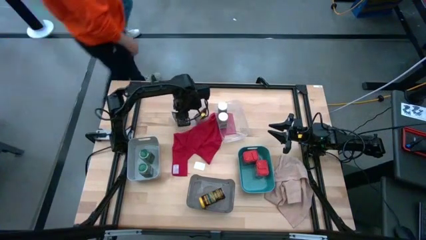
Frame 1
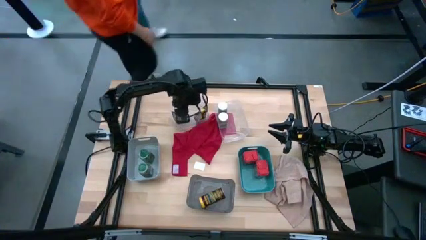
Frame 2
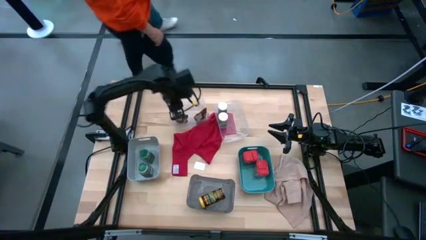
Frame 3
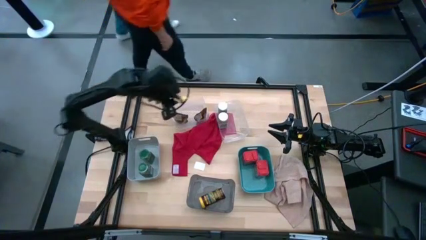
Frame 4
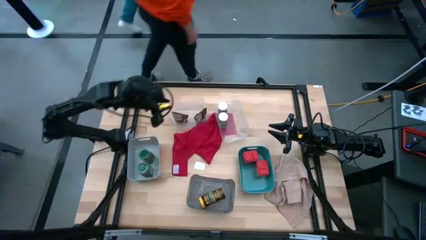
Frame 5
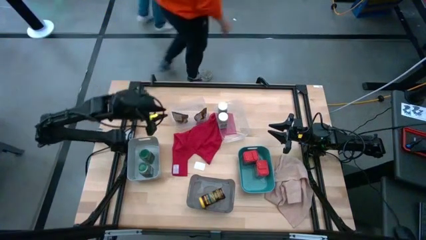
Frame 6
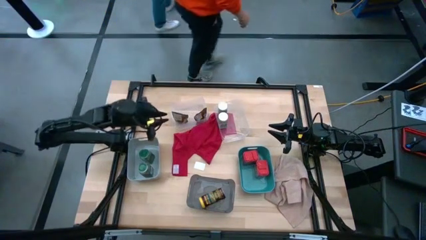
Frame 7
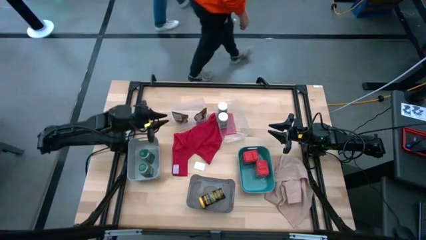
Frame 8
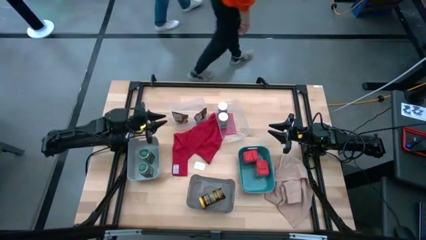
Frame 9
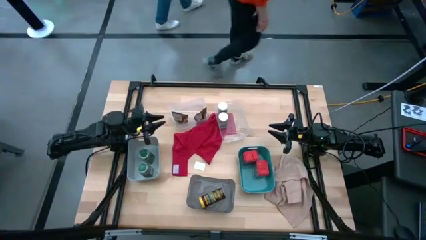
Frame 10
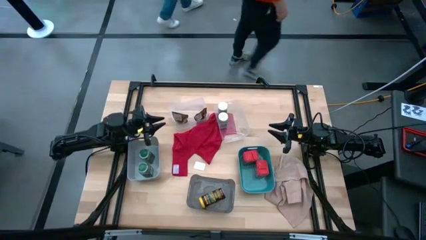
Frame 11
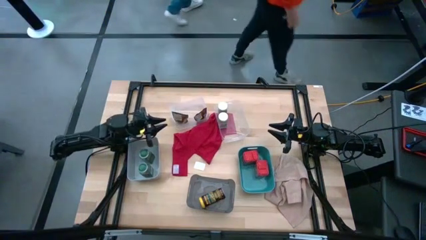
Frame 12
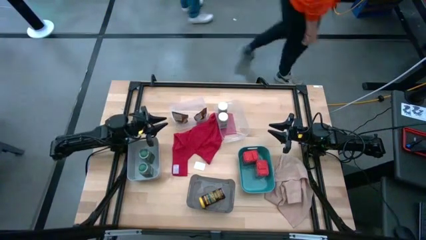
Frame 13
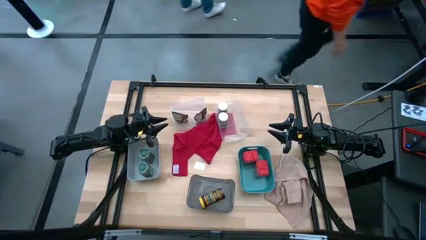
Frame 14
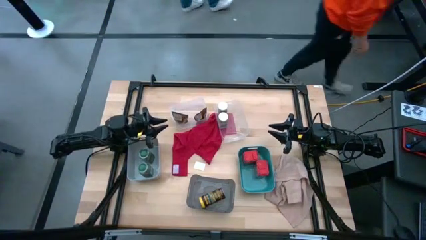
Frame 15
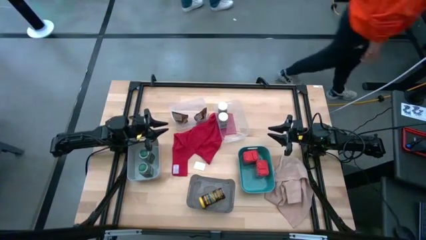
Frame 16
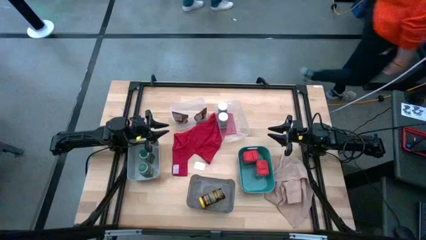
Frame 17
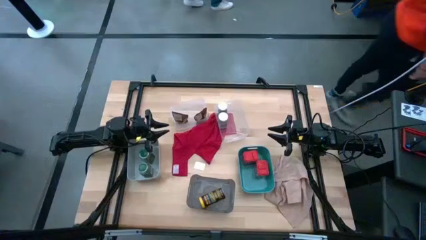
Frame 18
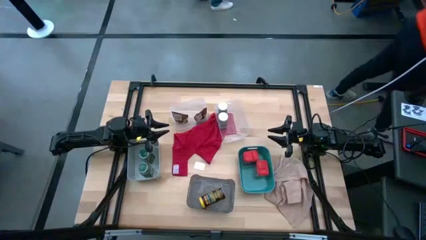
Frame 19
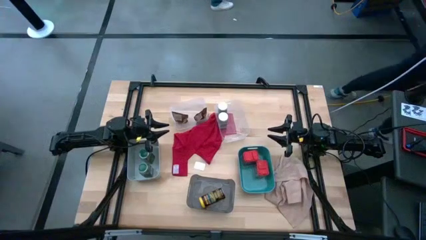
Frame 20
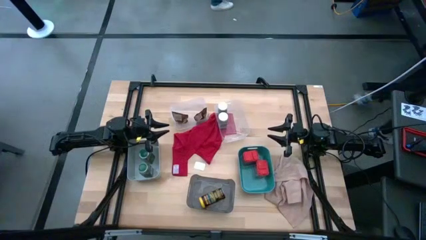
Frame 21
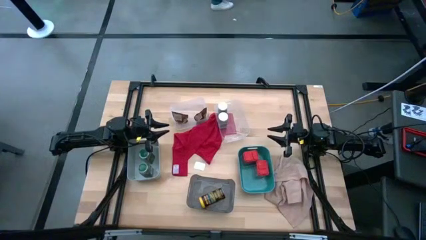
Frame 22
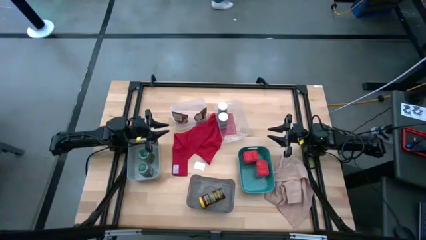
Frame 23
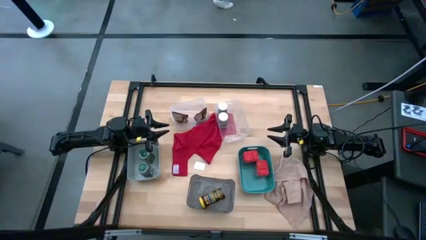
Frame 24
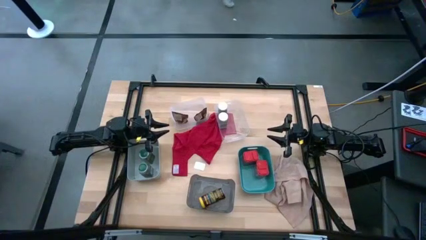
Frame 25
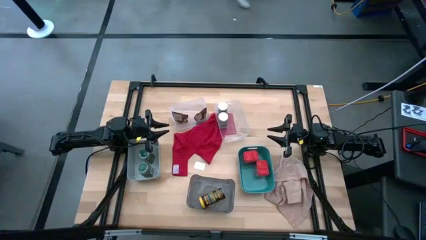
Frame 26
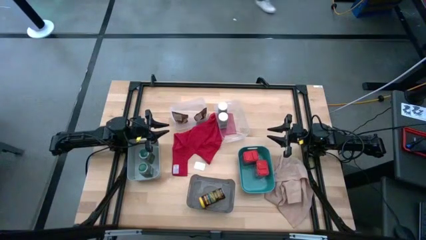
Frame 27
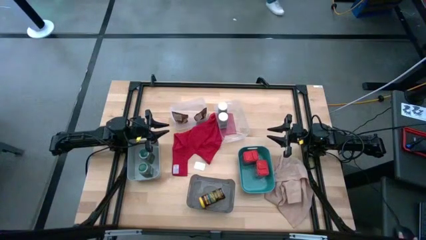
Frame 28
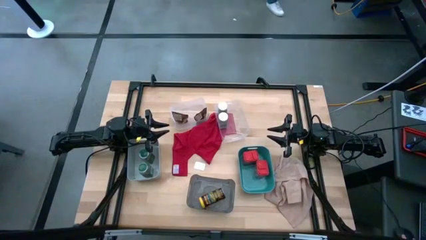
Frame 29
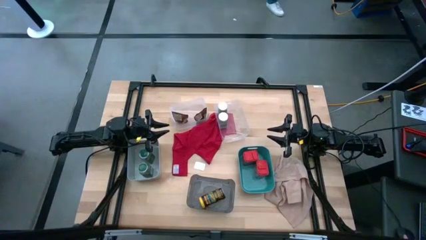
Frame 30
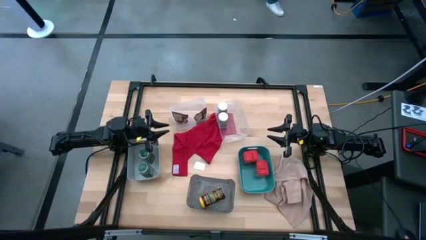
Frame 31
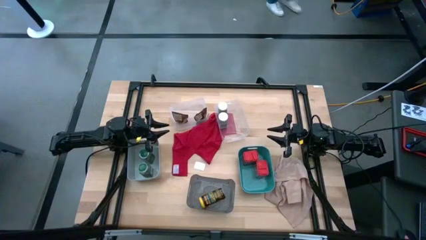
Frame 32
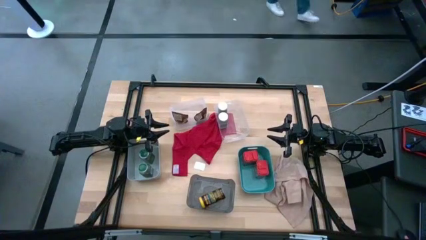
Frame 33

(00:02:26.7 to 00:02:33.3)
Task: Sort spices by type
Return to Home Position

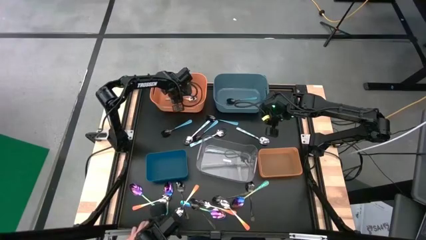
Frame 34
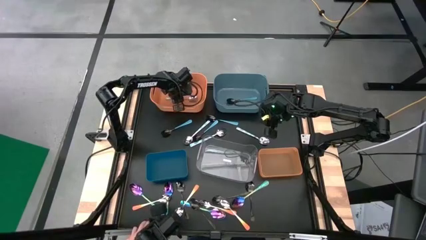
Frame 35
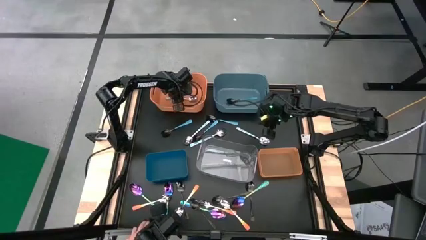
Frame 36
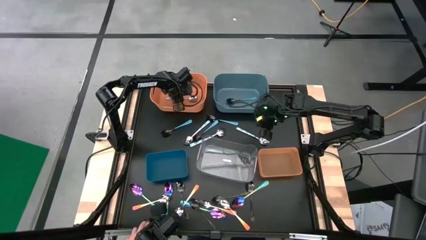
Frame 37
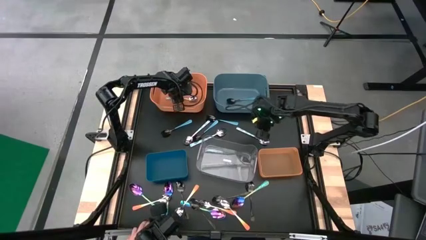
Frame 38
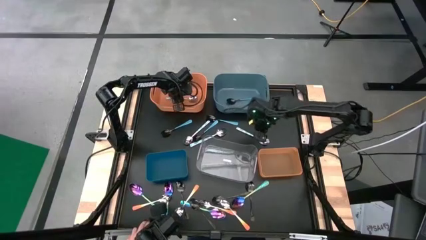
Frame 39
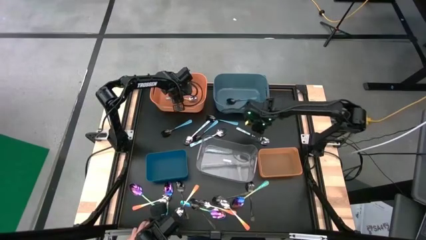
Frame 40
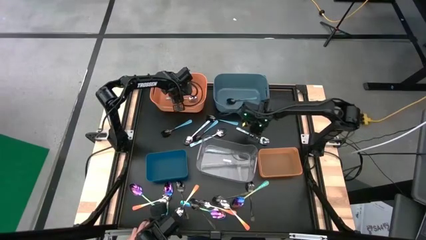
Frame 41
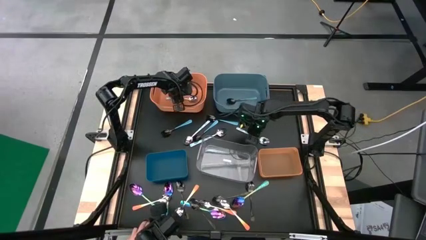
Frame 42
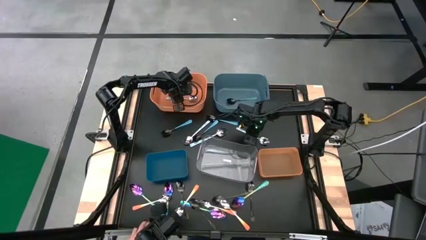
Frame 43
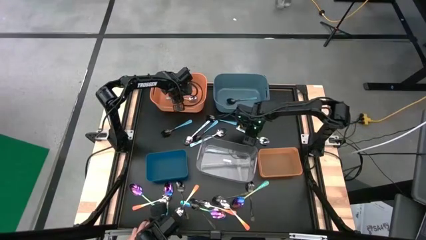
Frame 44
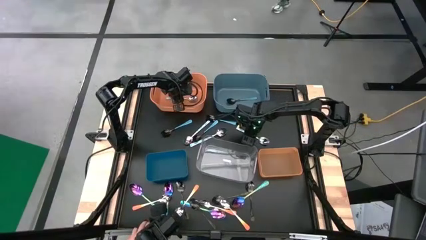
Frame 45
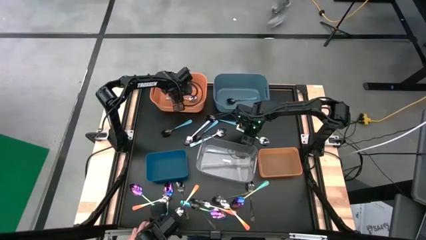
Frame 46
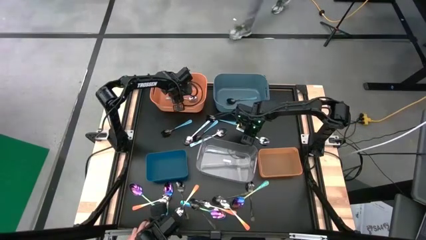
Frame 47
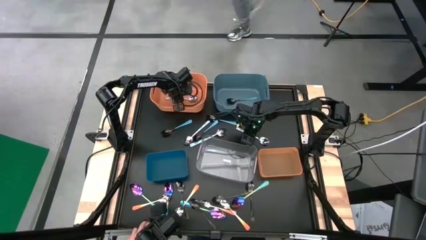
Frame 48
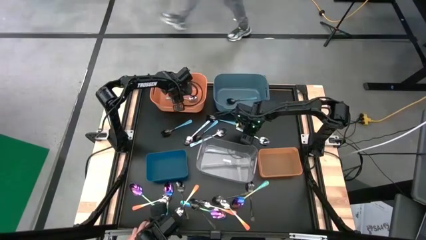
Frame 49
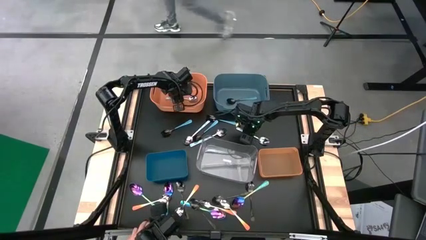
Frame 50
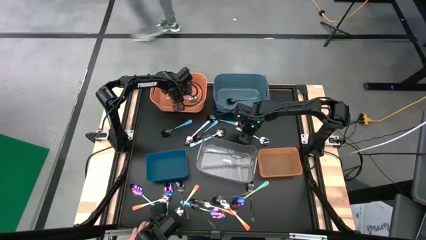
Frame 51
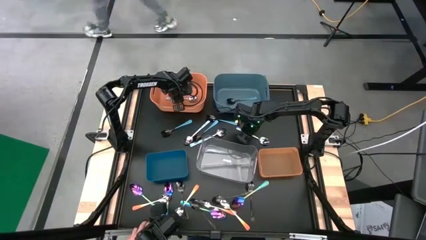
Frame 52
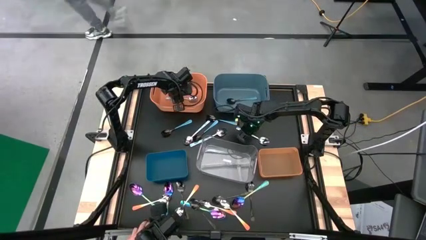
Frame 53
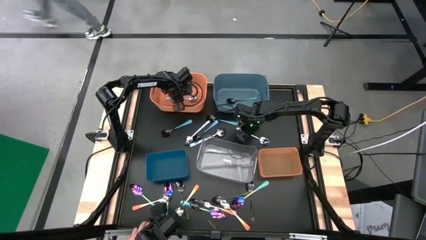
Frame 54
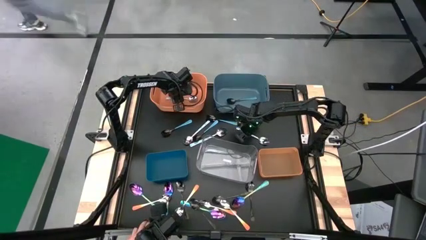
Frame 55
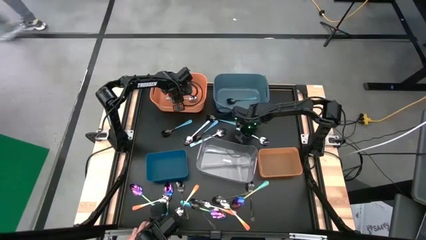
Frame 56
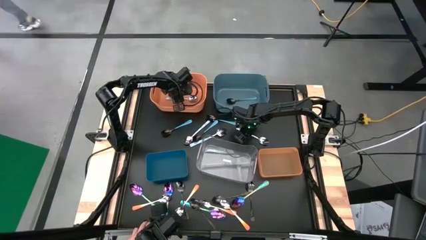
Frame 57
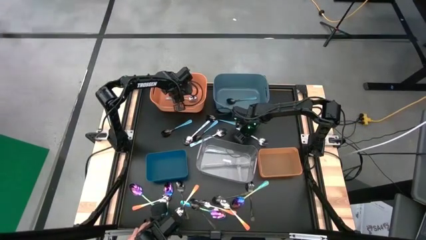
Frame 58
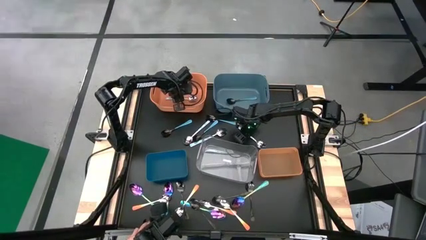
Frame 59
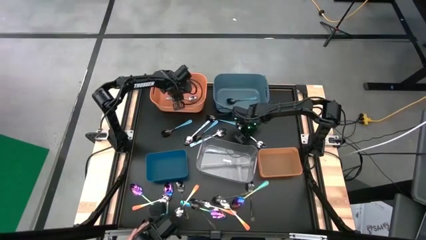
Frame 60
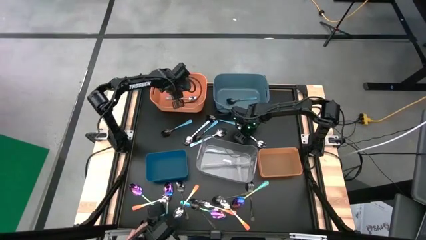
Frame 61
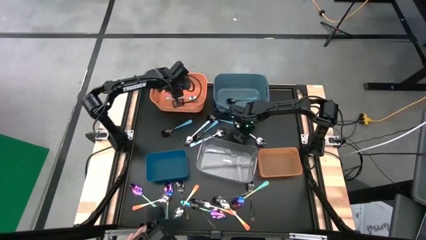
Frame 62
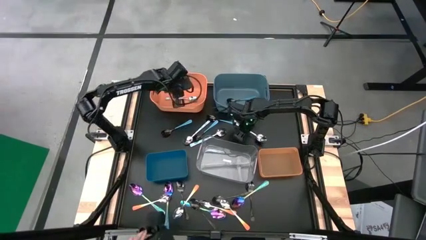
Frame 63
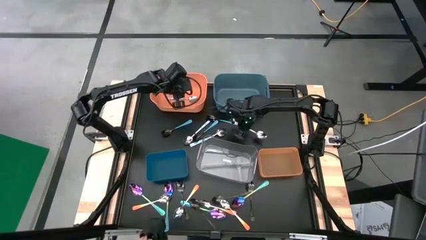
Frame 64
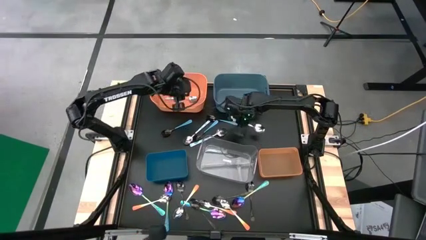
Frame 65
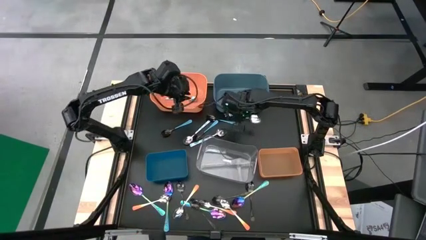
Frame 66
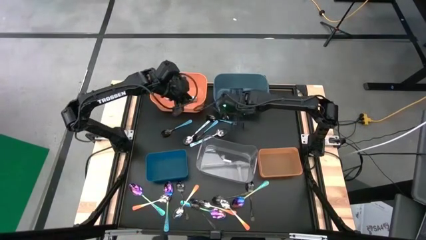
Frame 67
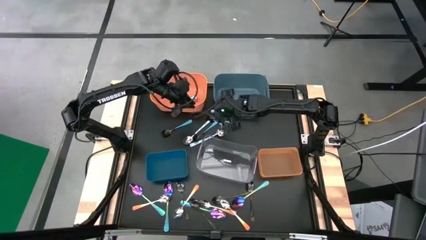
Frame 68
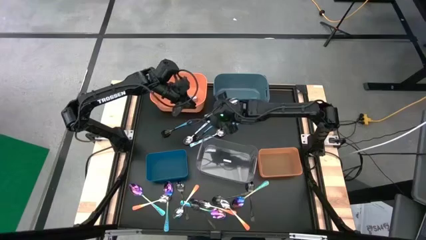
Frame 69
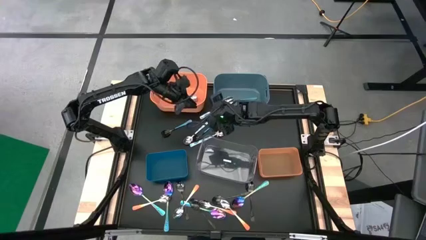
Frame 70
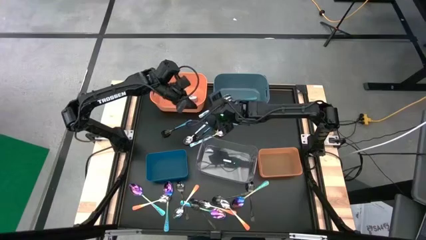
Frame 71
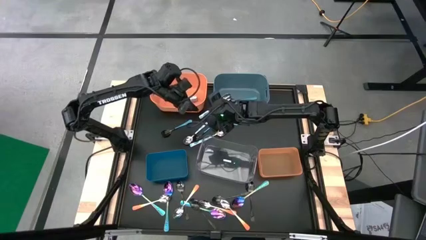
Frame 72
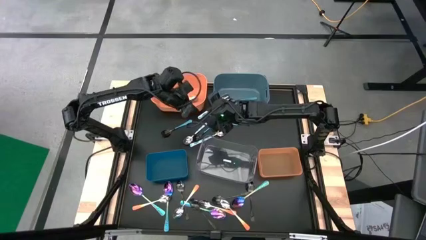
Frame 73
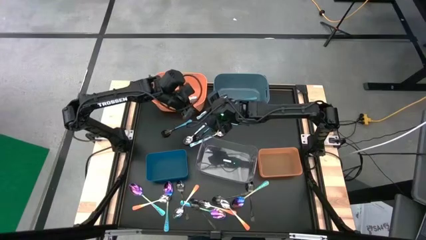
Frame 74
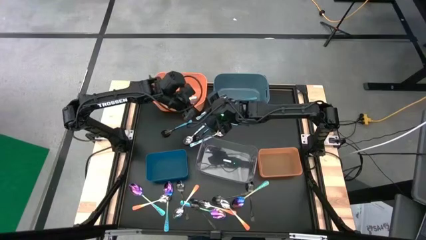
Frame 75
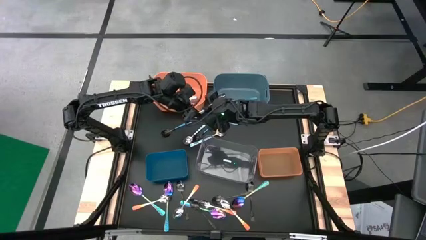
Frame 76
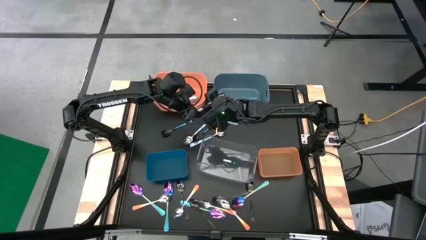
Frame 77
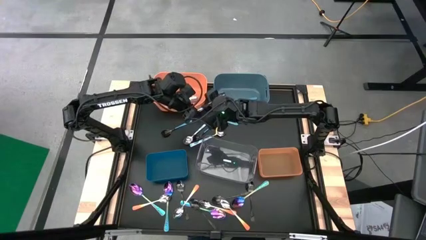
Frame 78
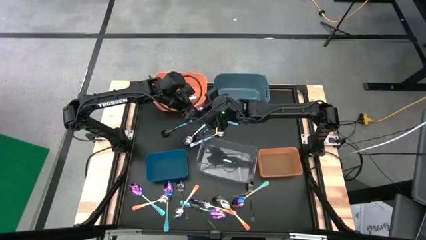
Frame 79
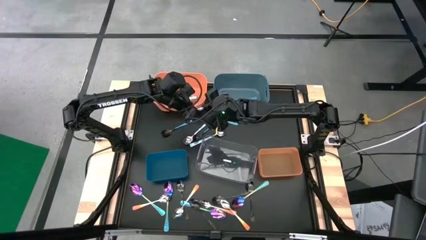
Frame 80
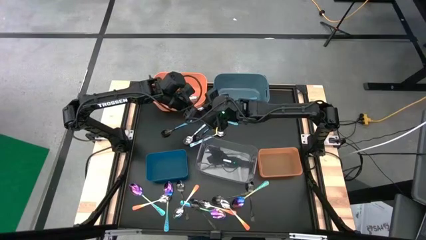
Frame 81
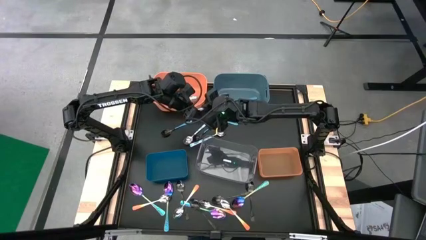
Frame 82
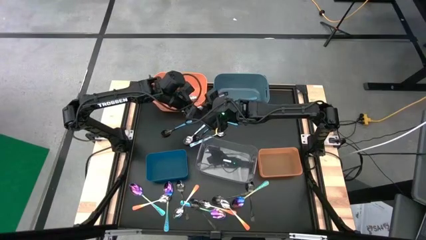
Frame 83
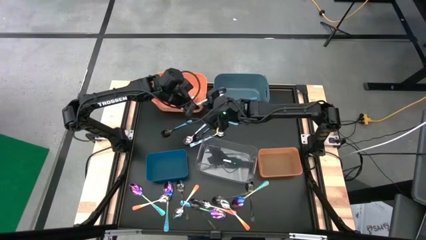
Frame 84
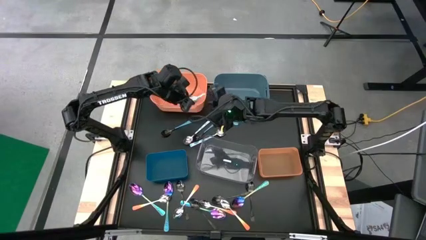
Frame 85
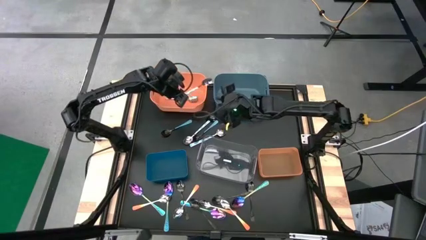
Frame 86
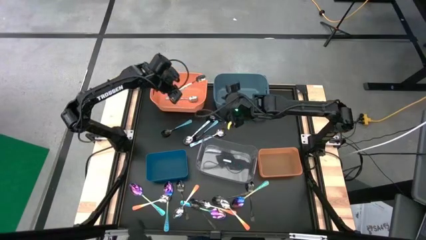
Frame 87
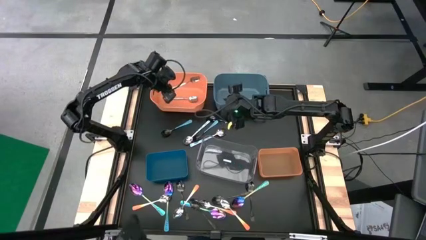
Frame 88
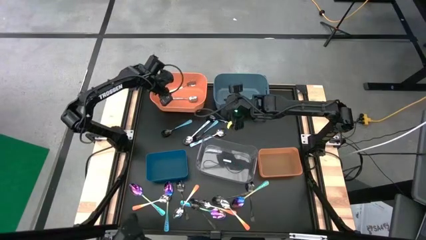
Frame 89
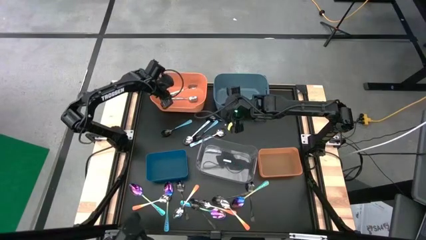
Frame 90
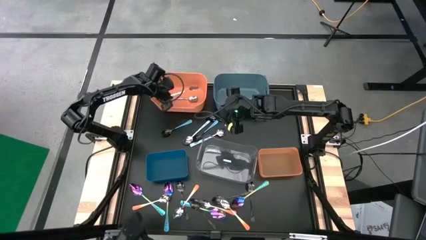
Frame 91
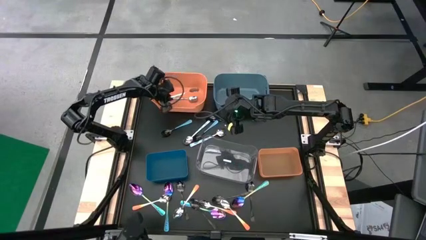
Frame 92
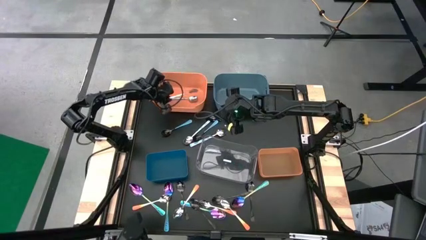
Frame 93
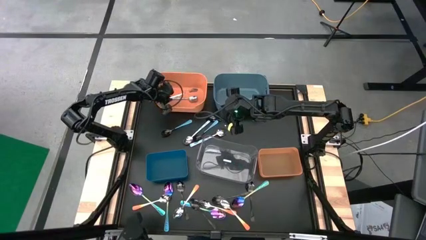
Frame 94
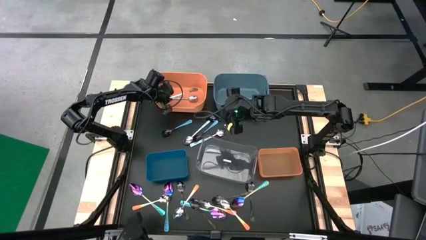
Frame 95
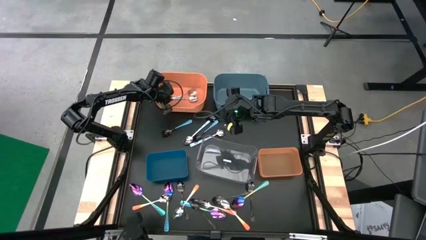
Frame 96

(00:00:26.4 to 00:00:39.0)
Task: Sort silverware by color (type)
Put the white patterned spoon into the orange bin
